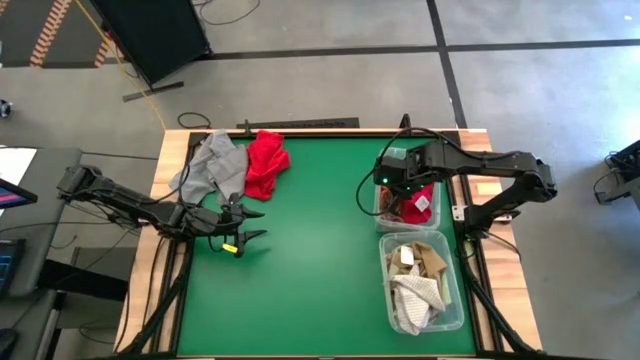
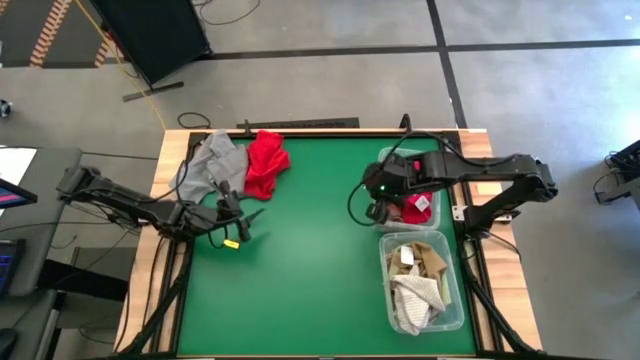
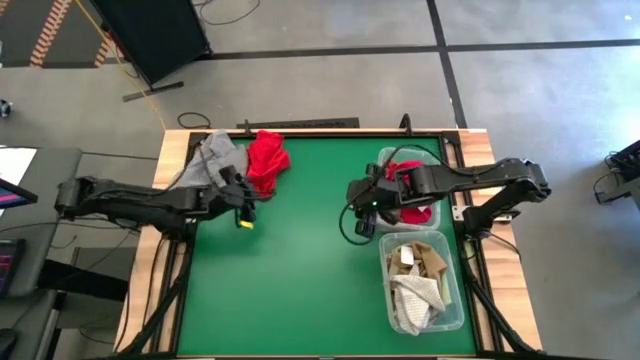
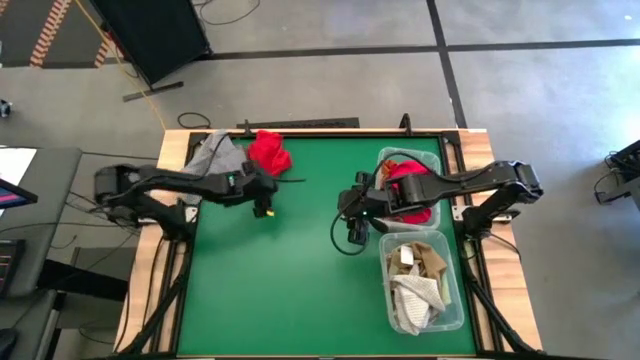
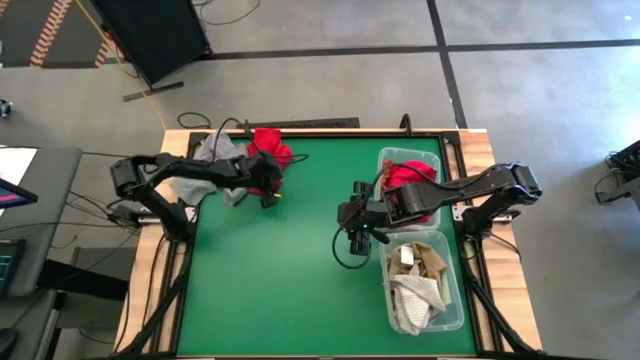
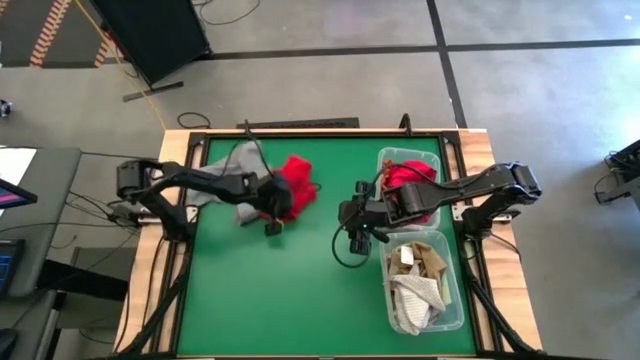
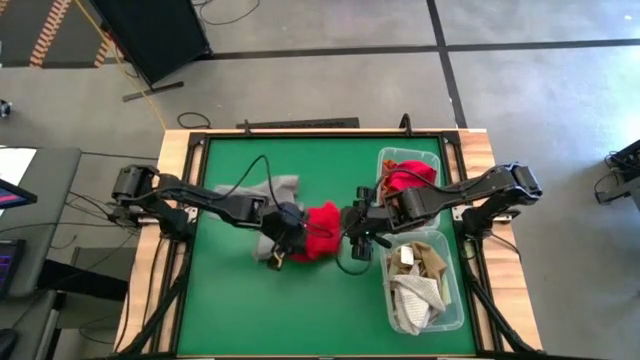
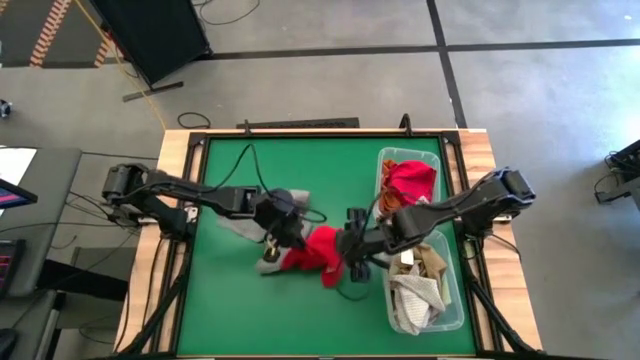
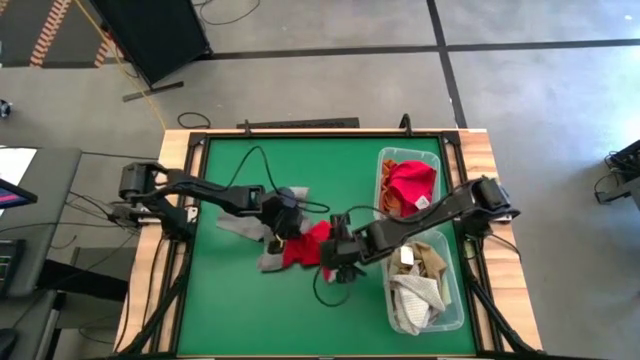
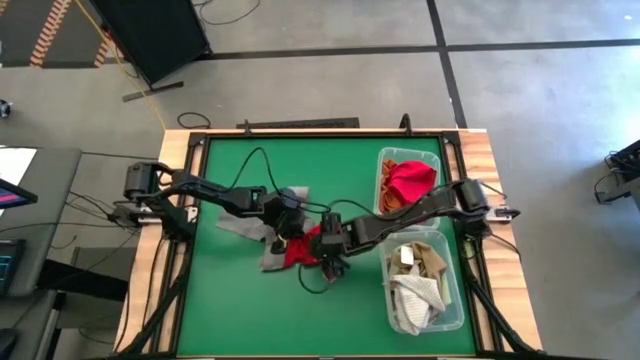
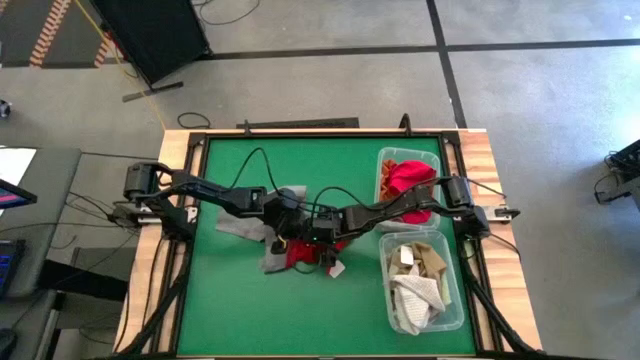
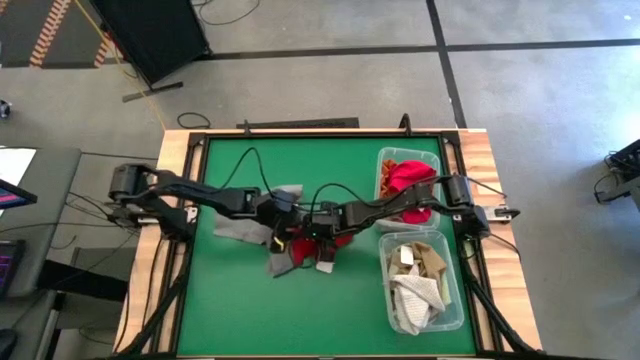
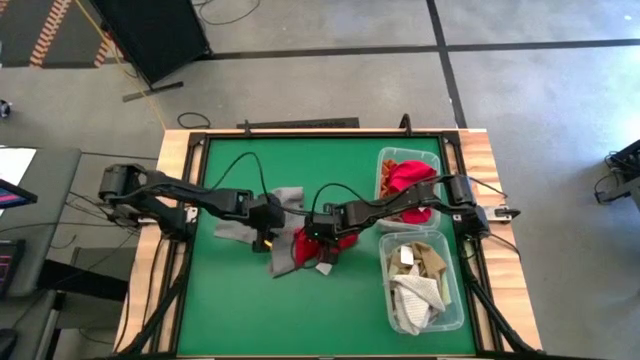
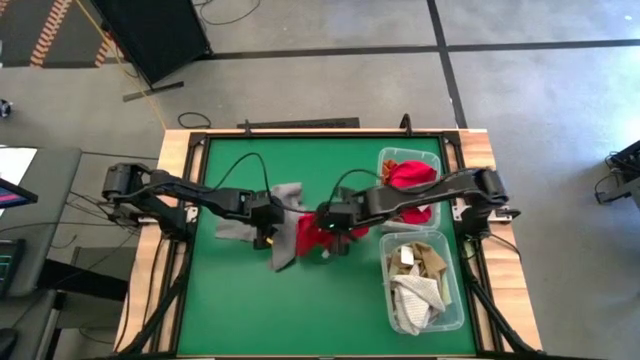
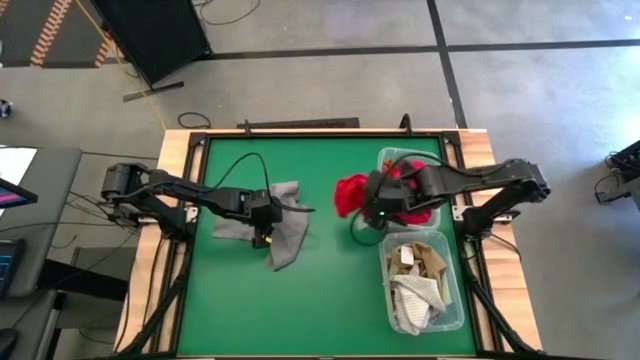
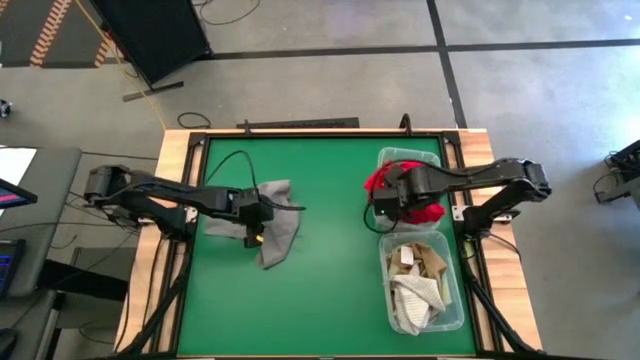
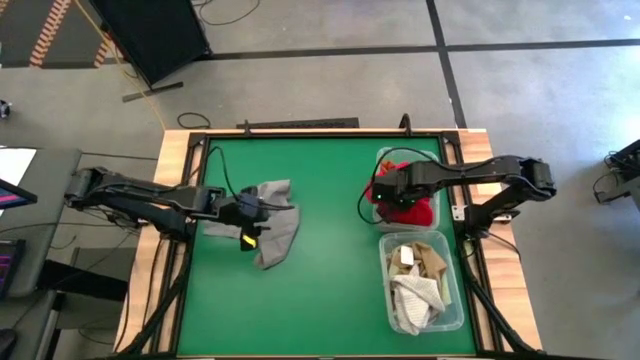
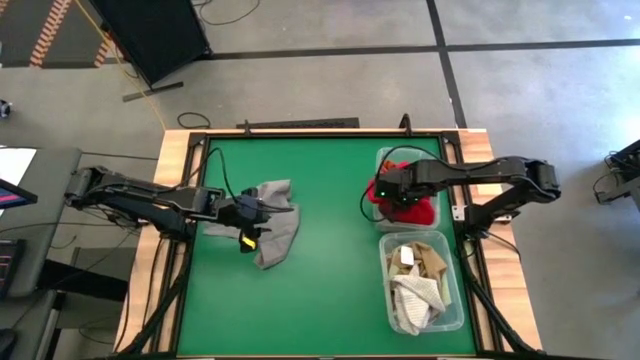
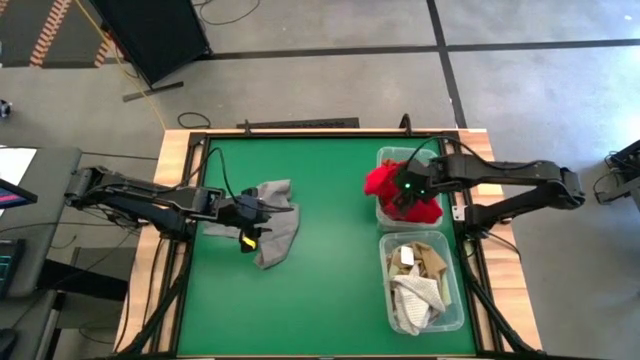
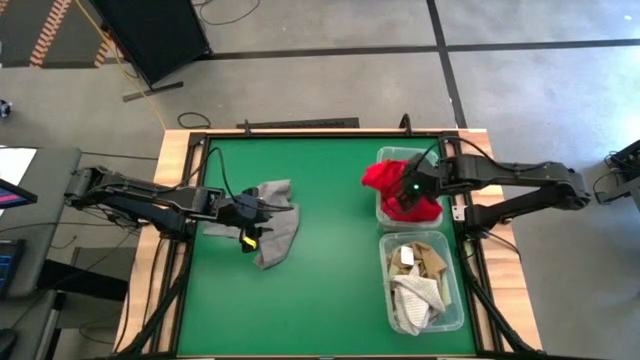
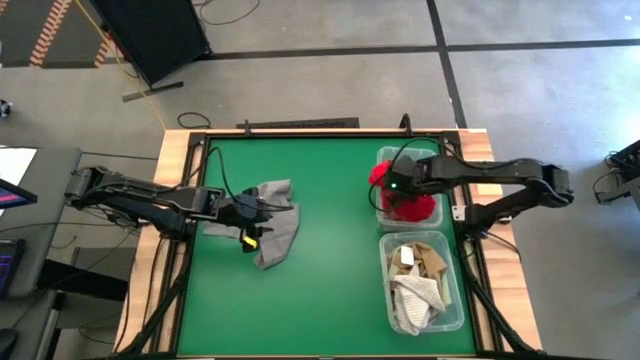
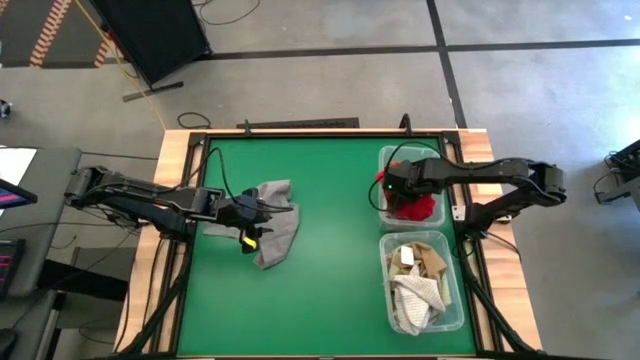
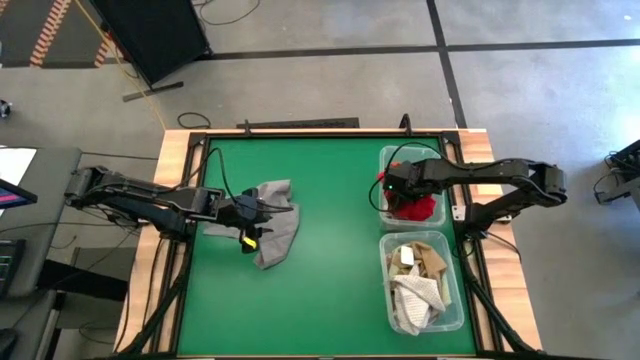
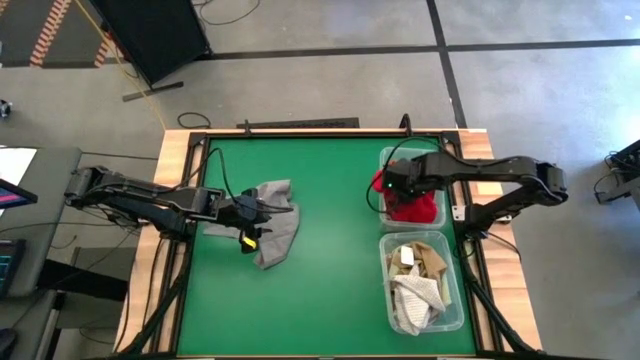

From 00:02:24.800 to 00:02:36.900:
Task: Sort towels by color in basket
Put the red towel into the top transparent bin

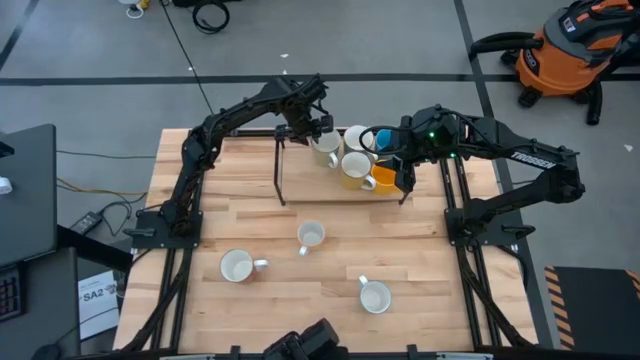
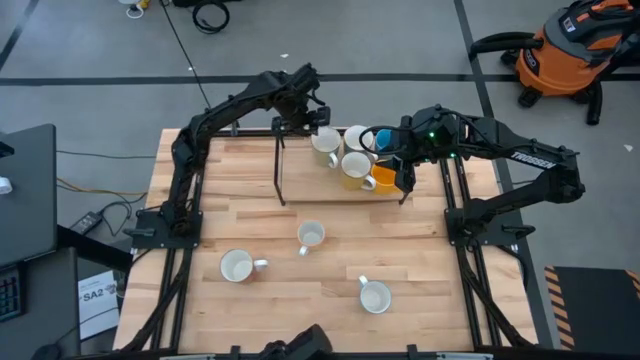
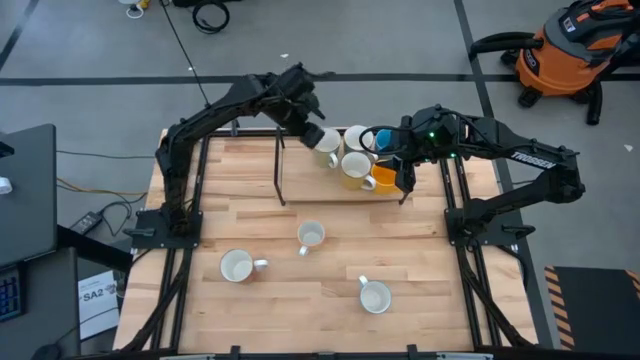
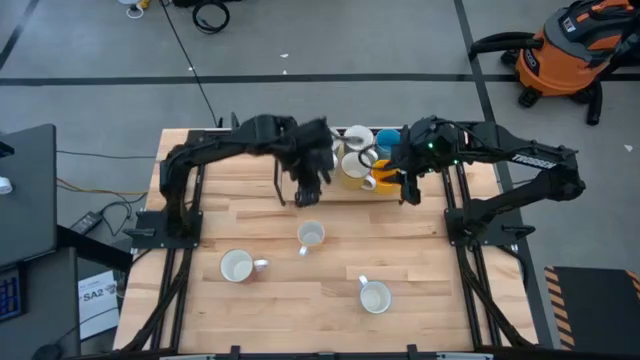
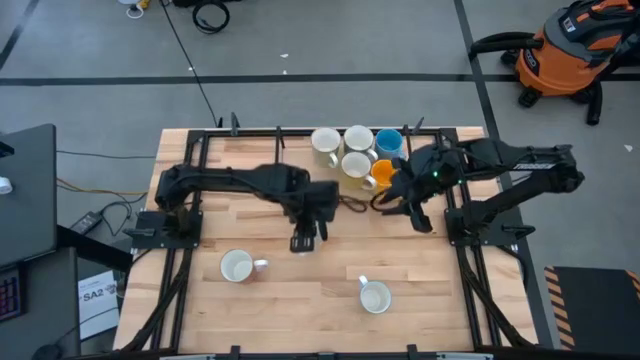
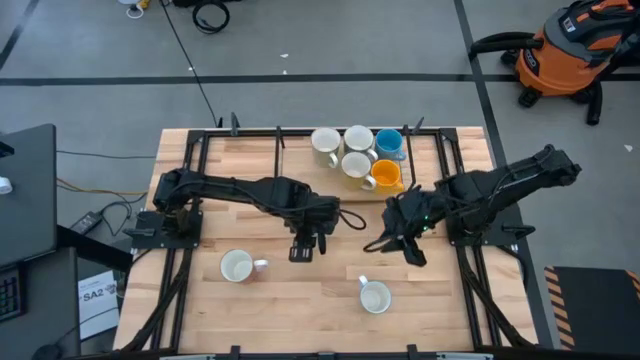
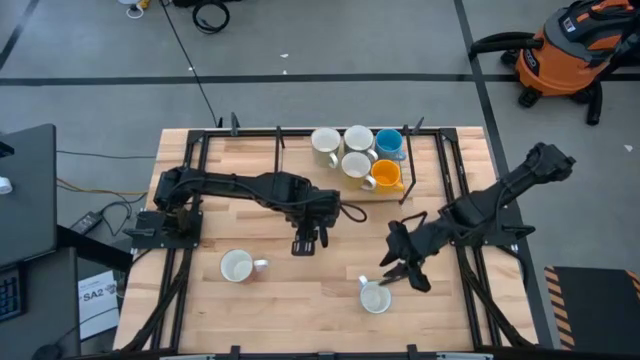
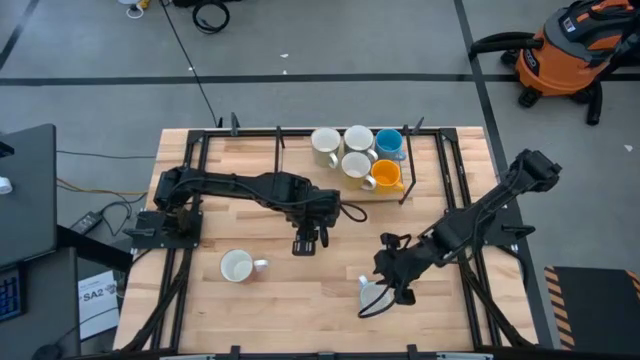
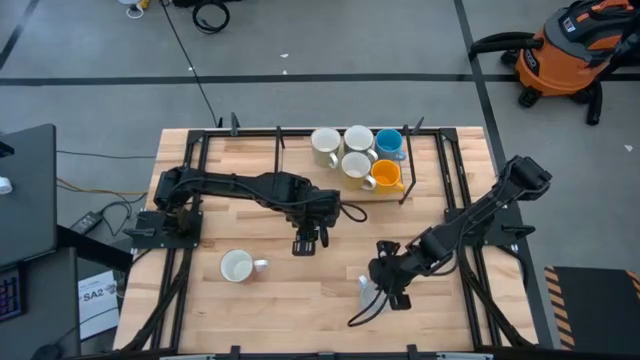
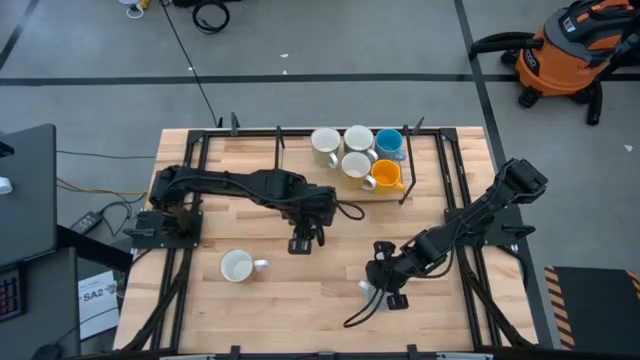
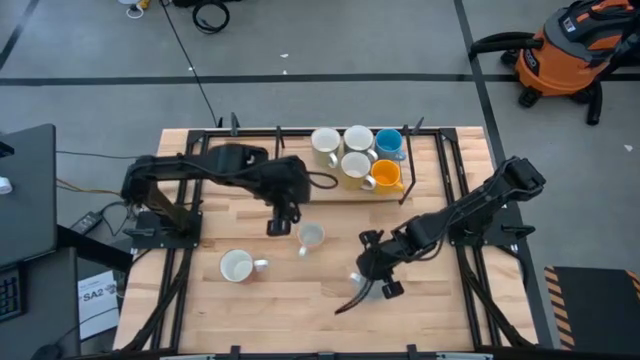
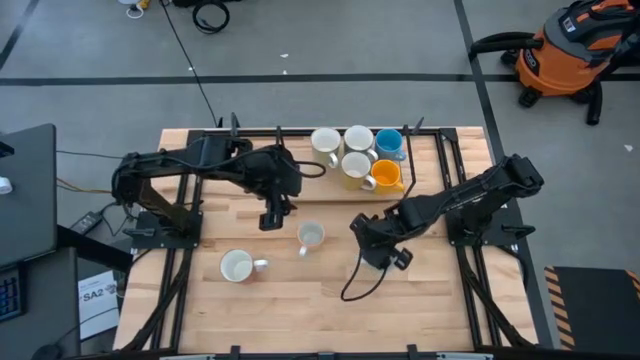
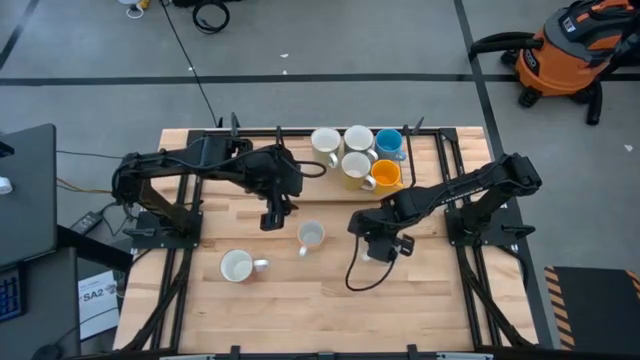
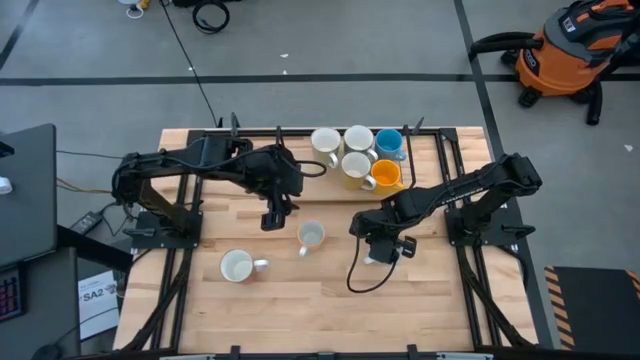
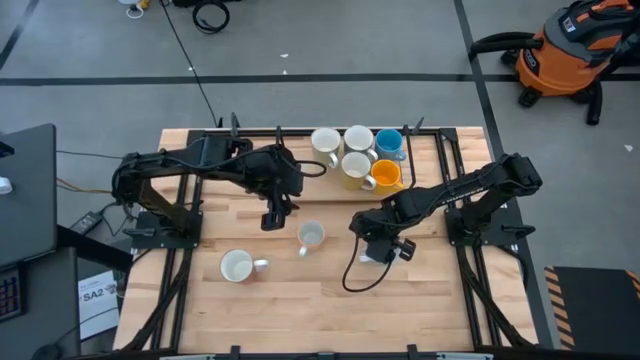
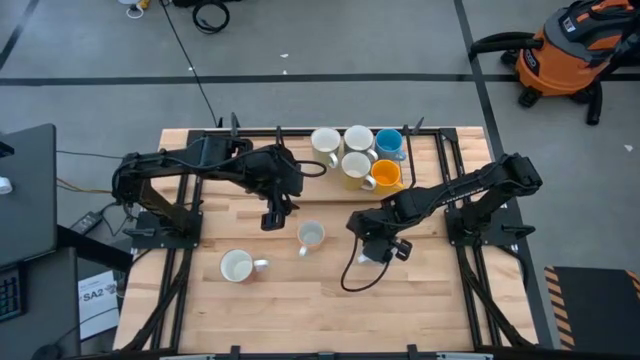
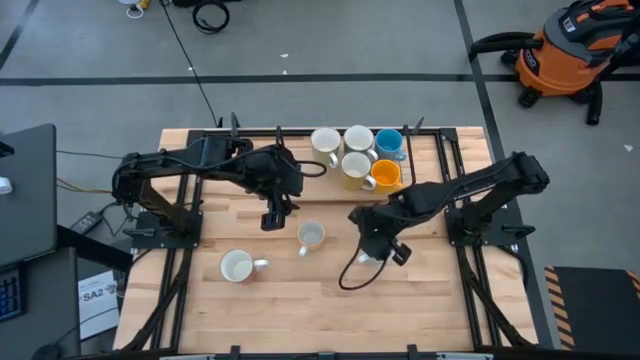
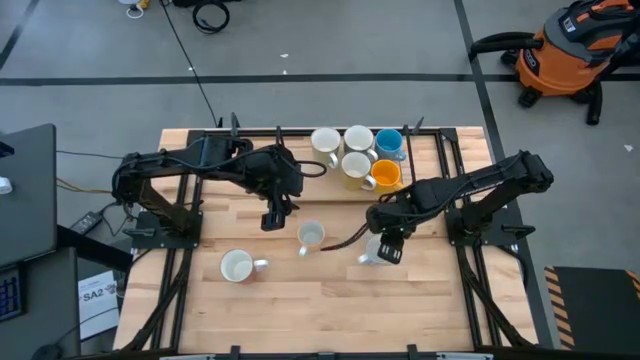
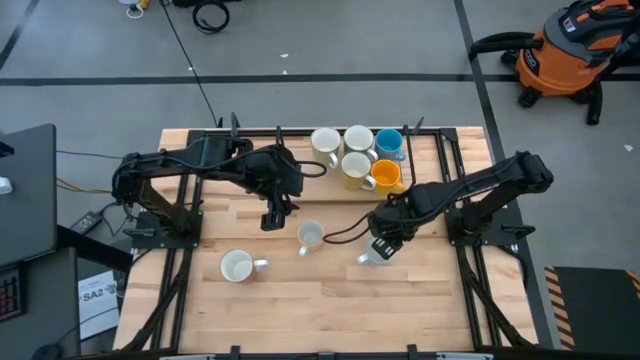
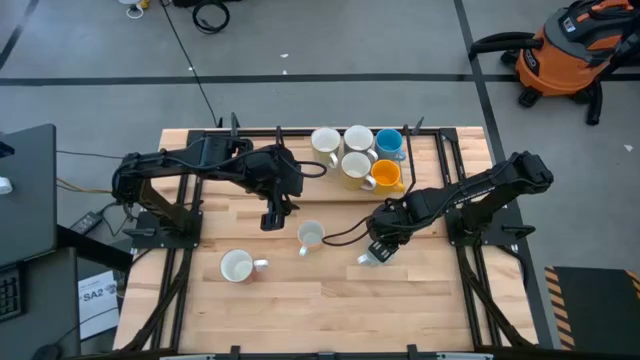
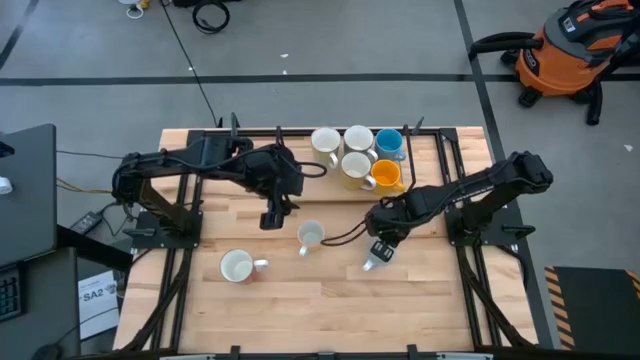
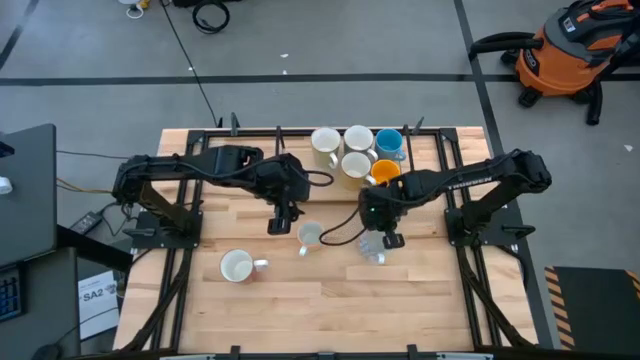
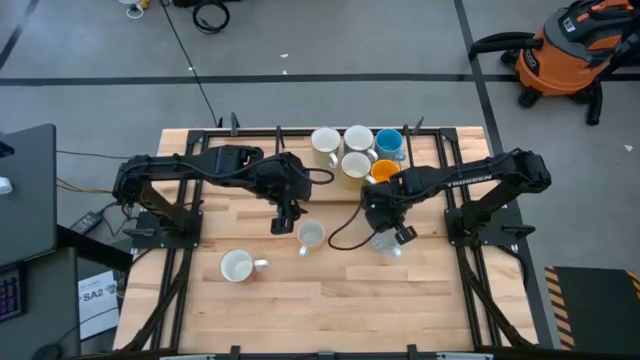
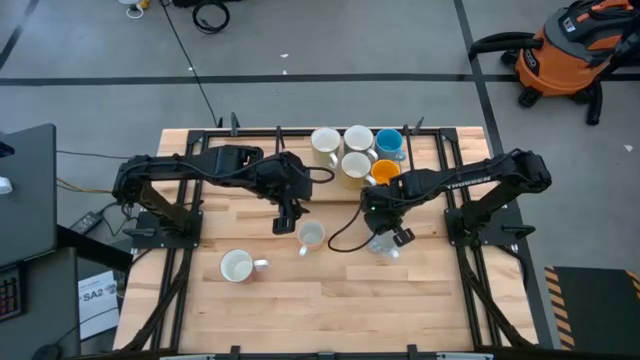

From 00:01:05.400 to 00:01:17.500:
Task: Place coffee mugs
Put the patterned blue mug on the shelf
